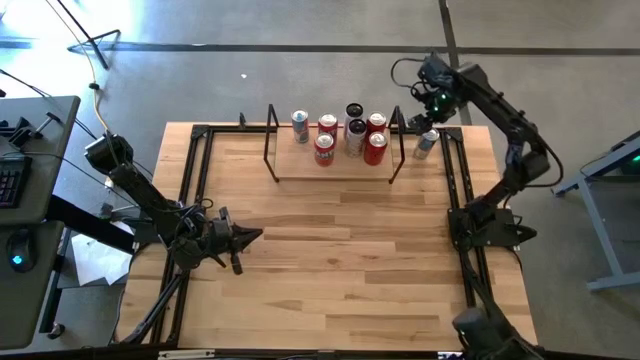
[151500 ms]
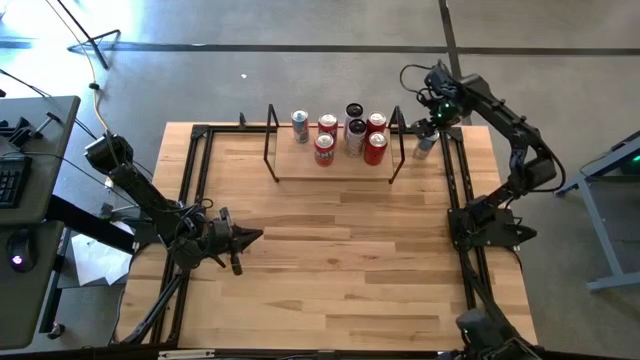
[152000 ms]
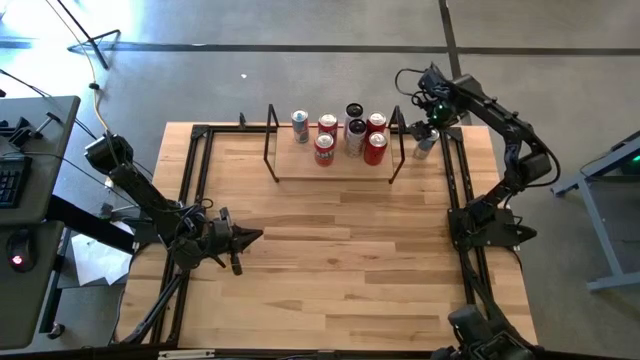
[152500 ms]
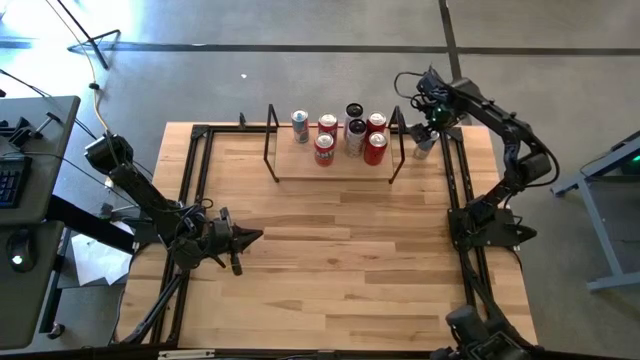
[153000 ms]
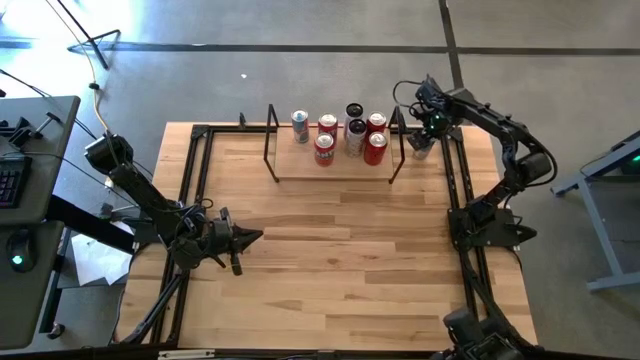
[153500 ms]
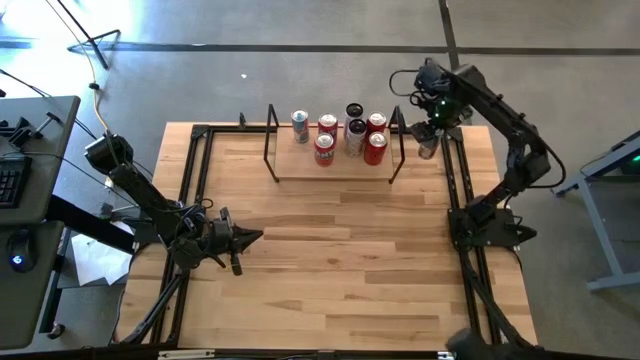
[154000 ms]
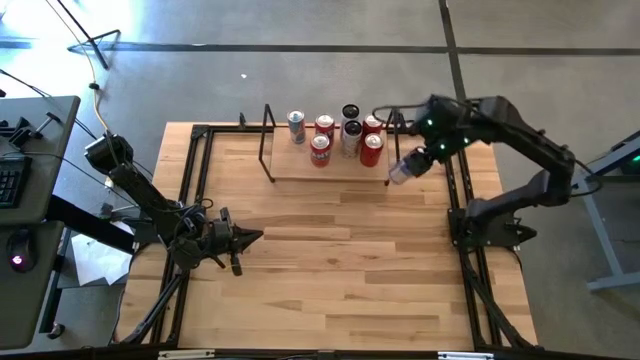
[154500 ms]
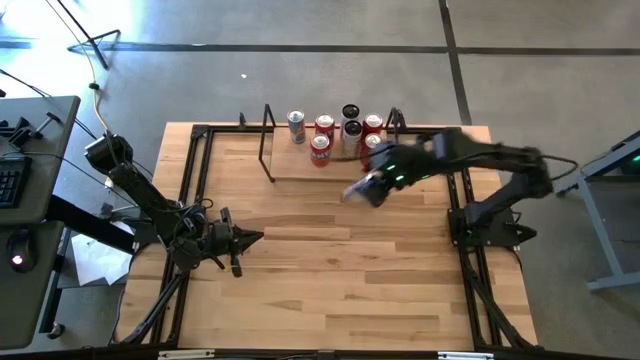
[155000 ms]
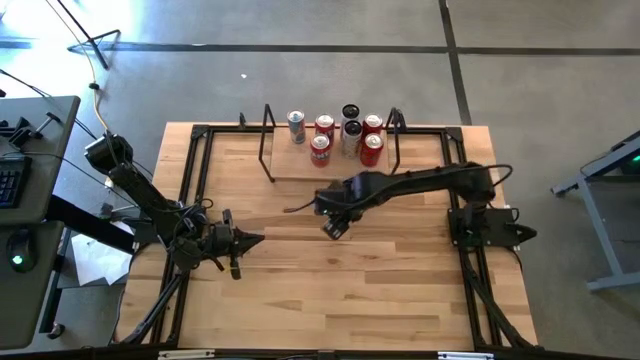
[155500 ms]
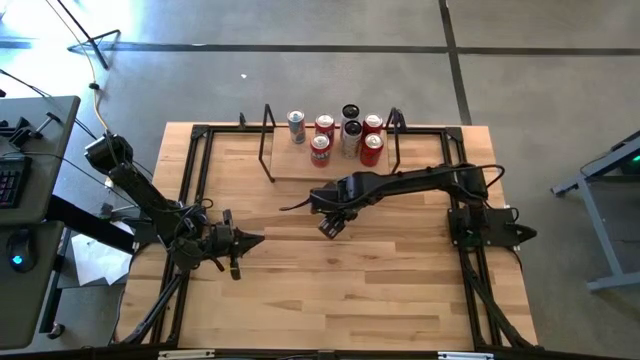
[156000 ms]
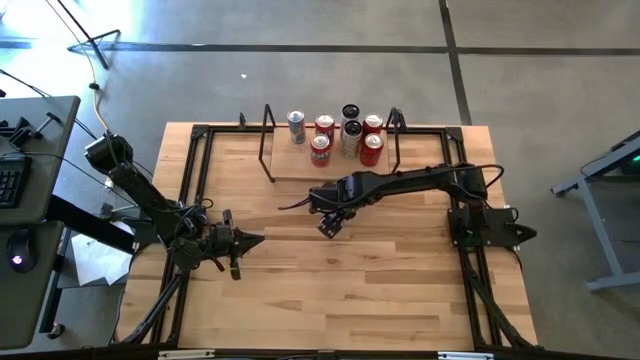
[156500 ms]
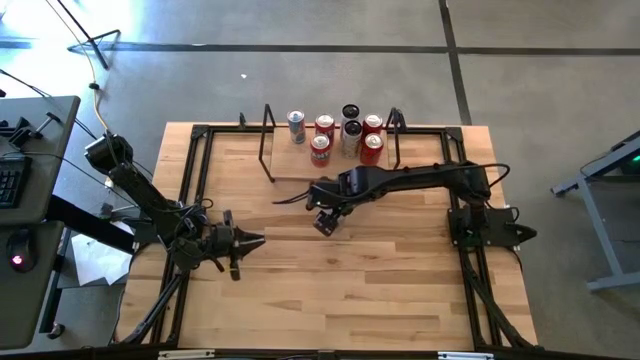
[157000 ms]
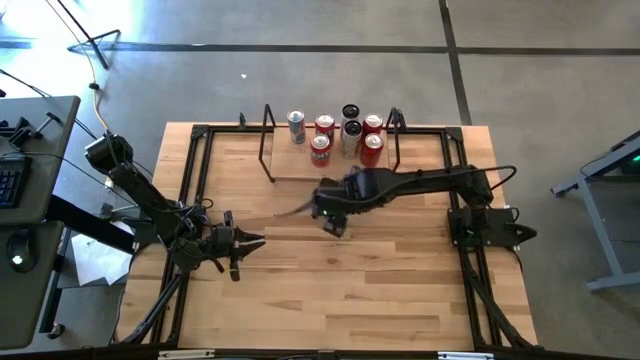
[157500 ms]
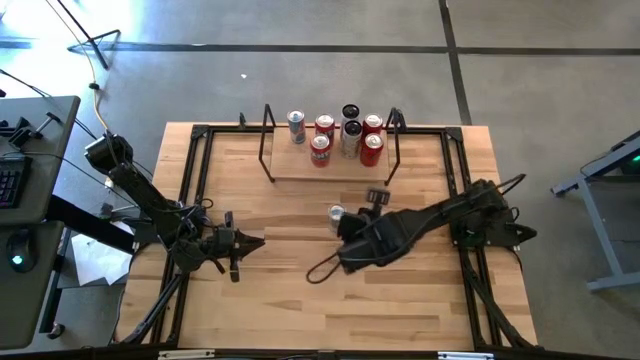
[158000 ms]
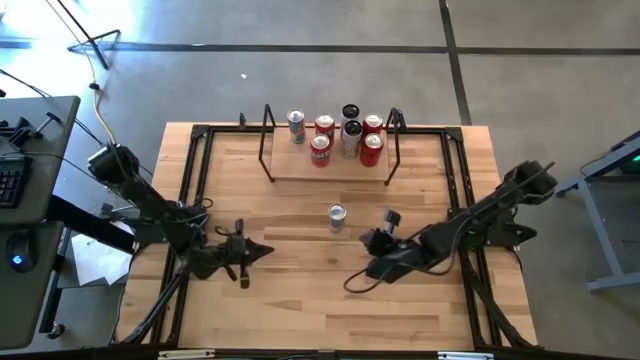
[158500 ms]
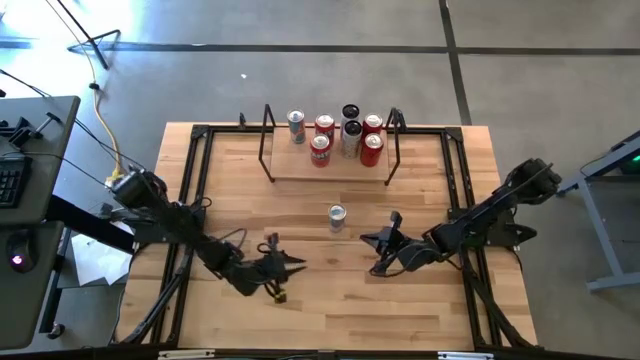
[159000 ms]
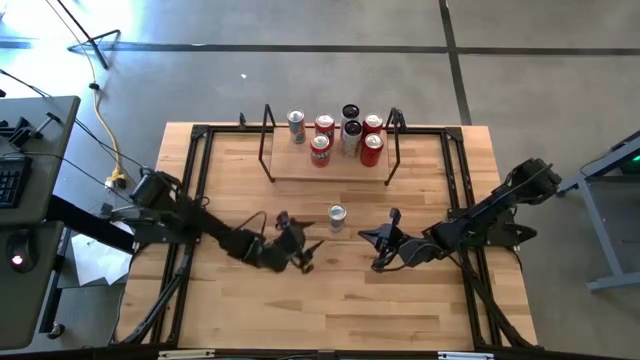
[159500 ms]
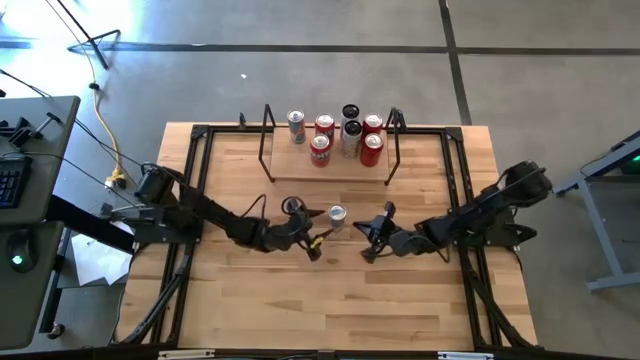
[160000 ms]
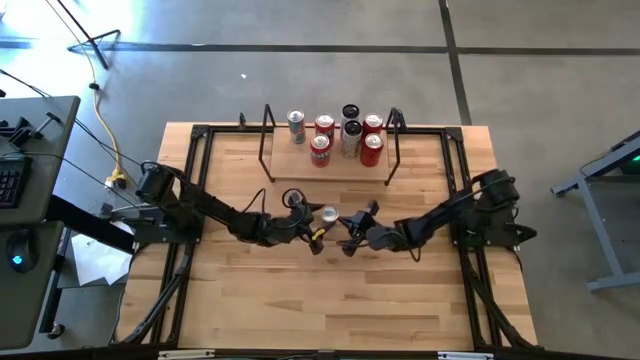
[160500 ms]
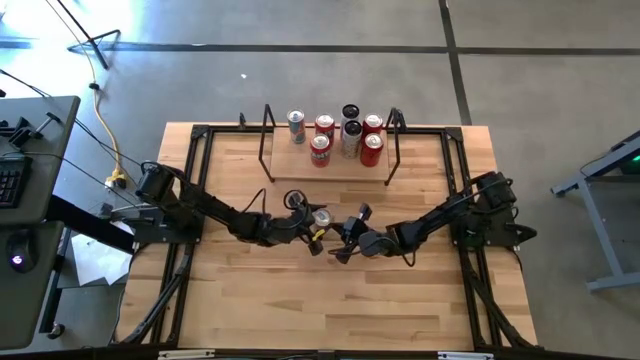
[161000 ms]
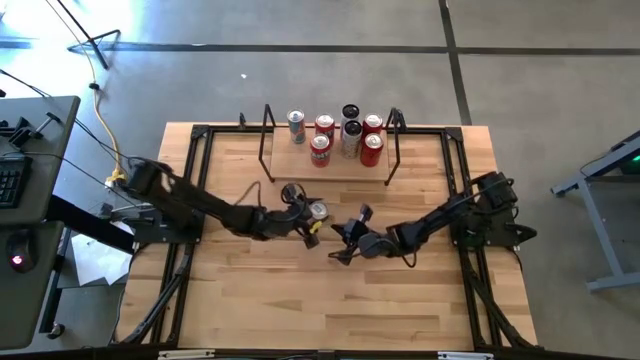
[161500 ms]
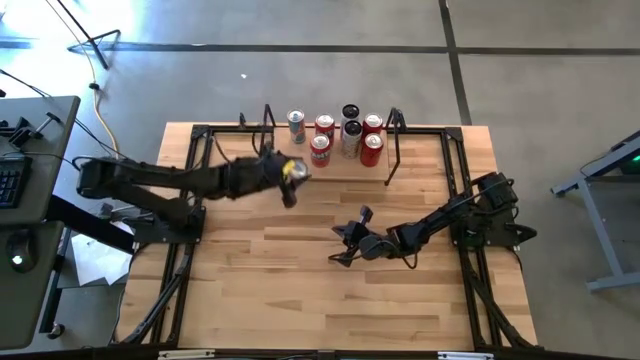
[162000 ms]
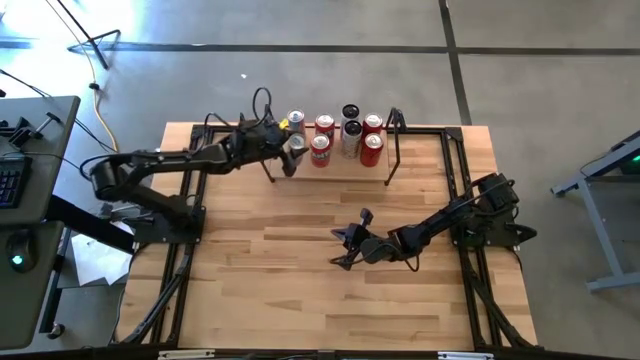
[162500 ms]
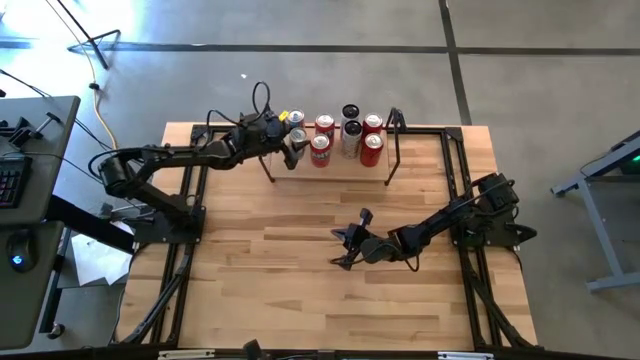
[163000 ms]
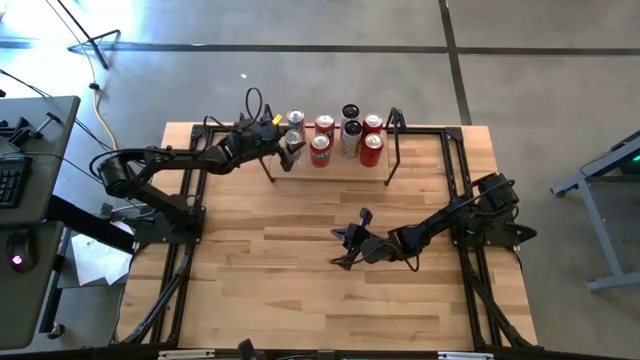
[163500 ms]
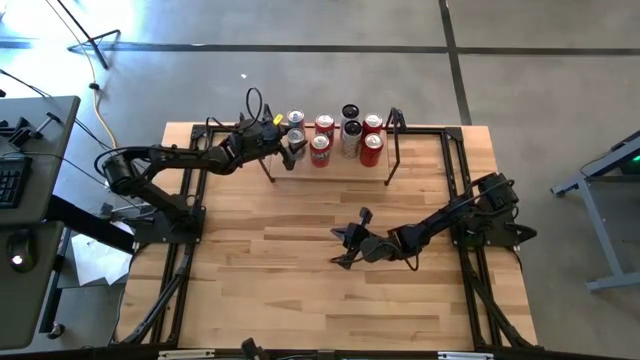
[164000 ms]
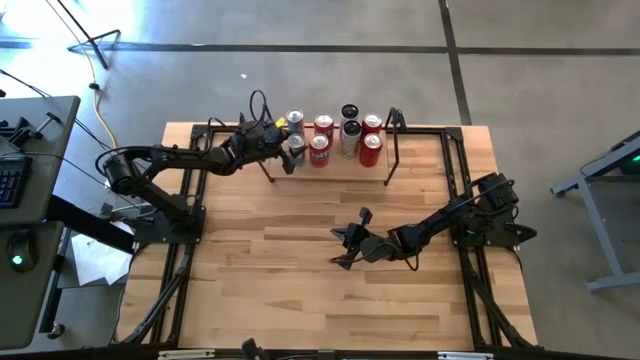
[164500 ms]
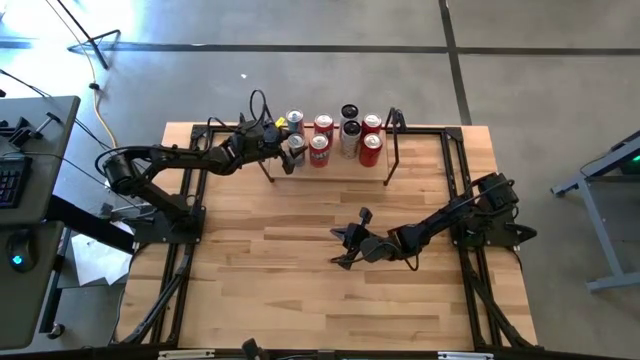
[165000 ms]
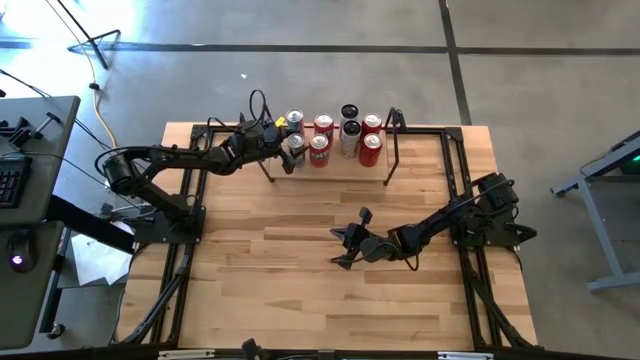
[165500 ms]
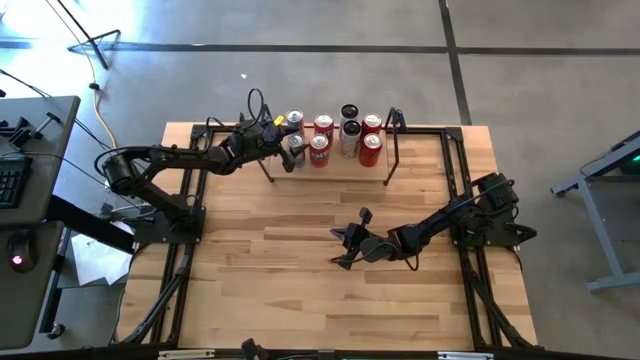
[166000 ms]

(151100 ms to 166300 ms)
Task: Place canned beverage on shelf
Put the blue soda can on the shelf aligned with the other blue soda can

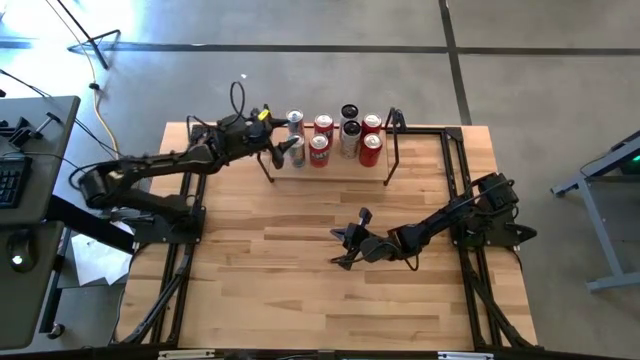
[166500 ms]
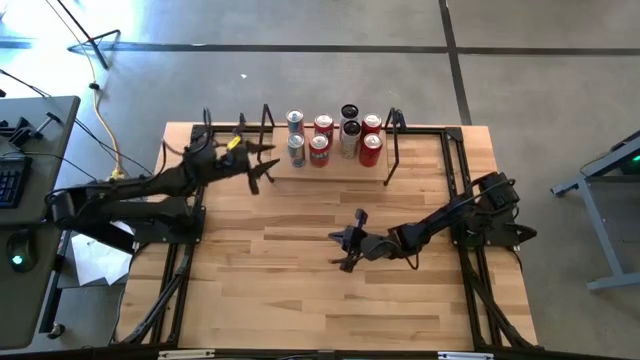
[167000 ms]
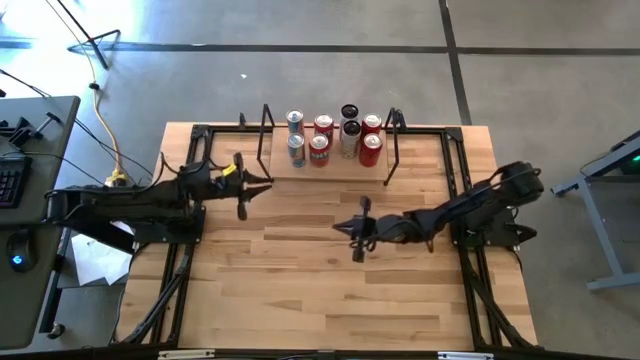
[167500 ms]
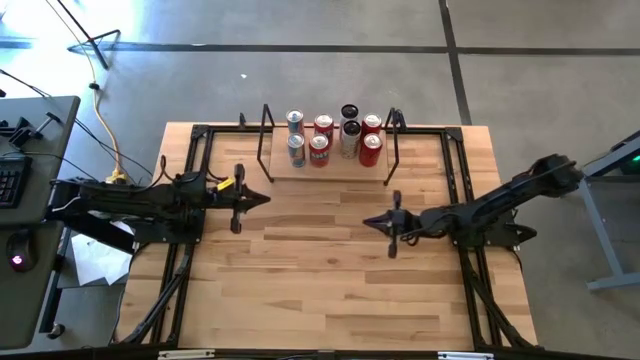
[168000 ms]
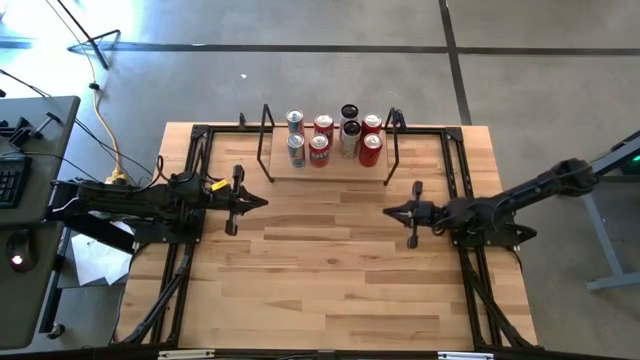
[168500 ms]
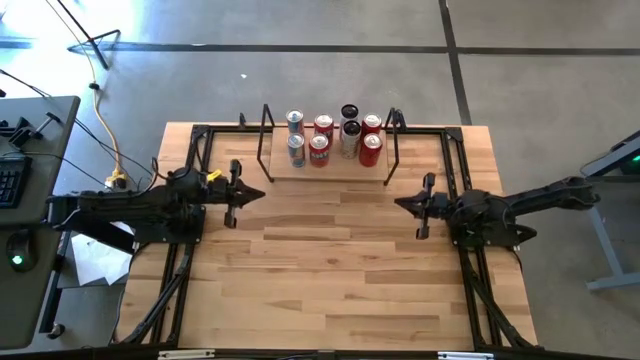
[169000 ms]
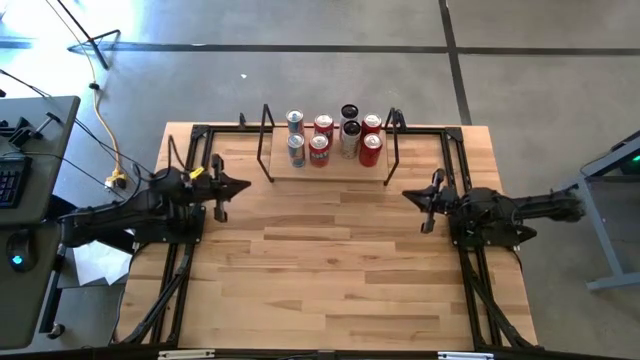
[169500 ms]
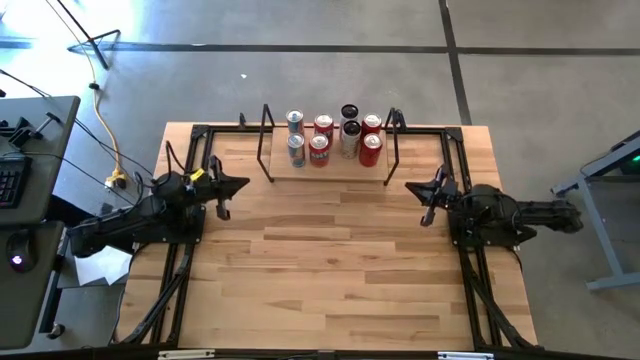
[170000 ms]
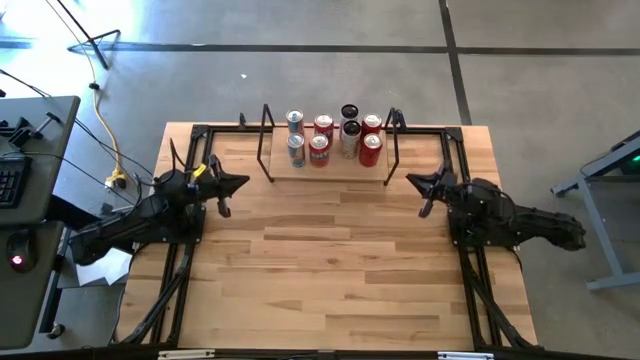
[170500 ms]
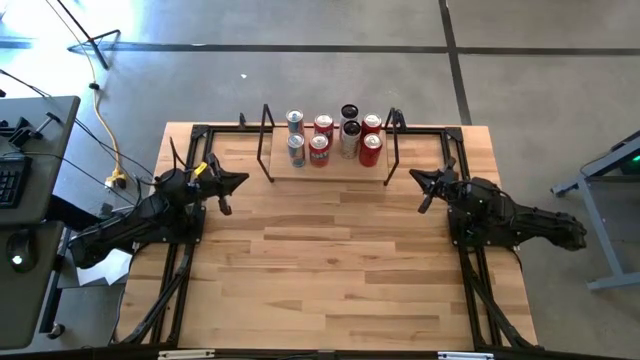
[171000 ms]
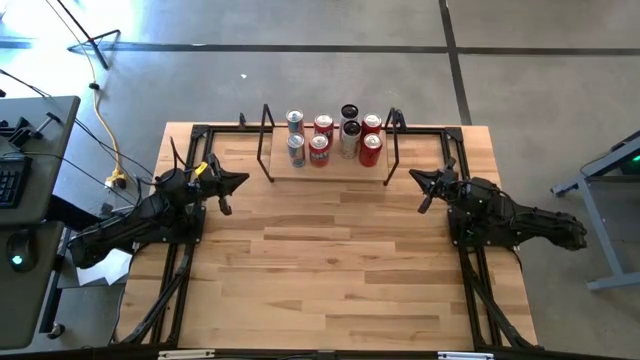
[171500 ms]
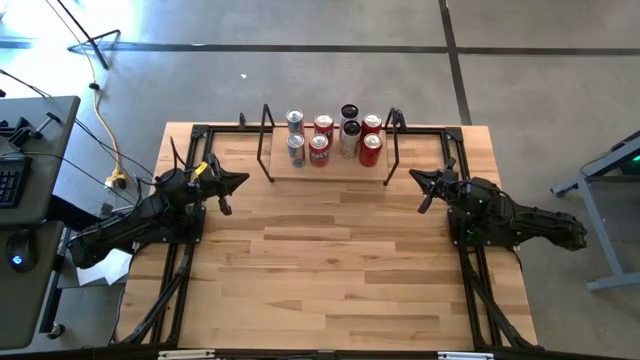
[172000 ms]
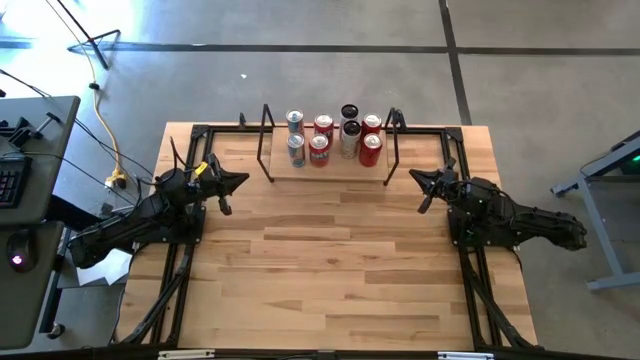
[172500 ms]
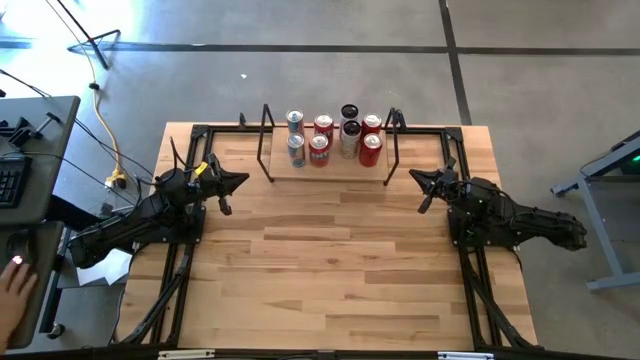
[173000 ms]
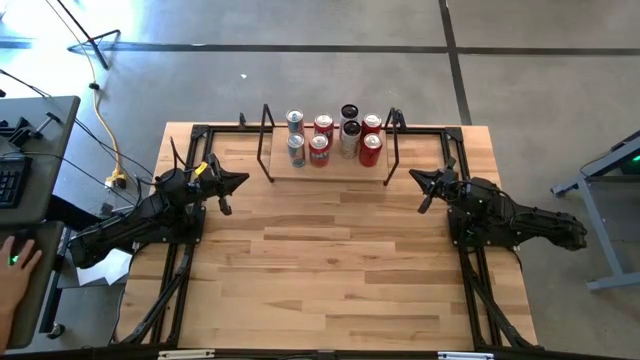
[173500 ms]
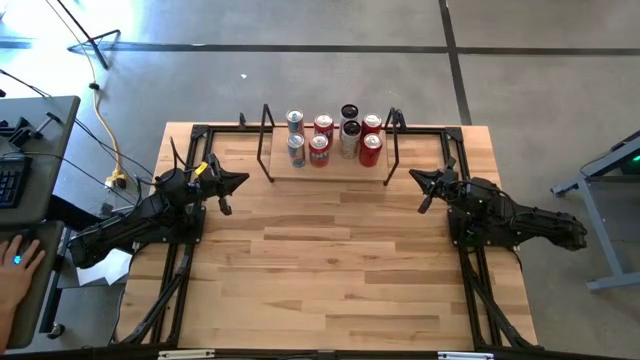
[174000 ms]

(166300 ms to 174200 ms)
Return to Home Position
